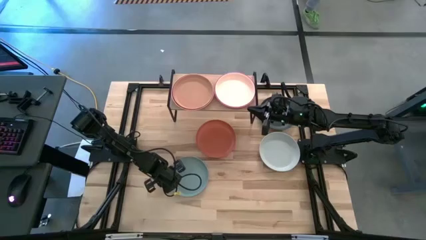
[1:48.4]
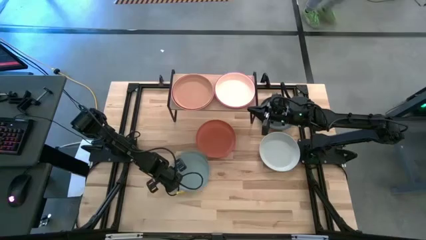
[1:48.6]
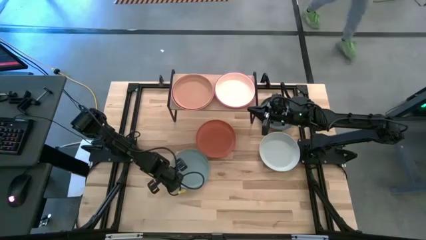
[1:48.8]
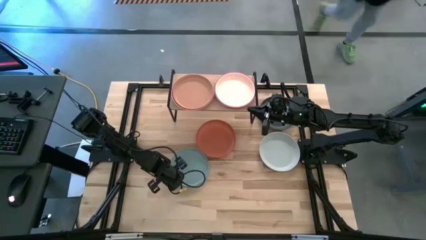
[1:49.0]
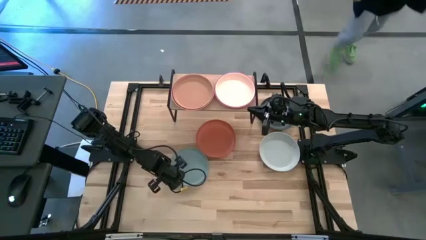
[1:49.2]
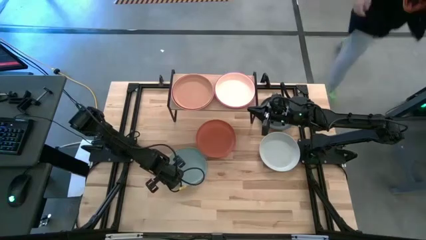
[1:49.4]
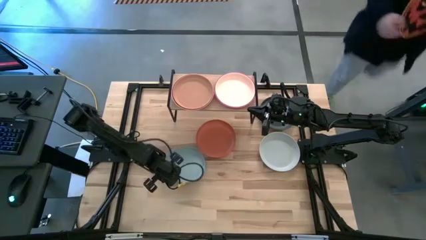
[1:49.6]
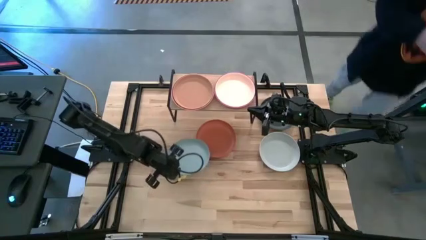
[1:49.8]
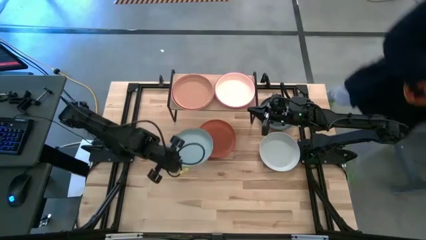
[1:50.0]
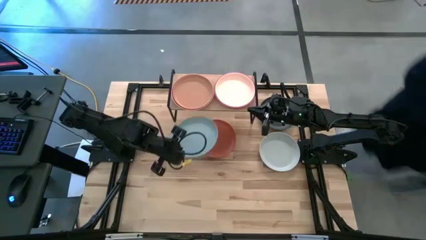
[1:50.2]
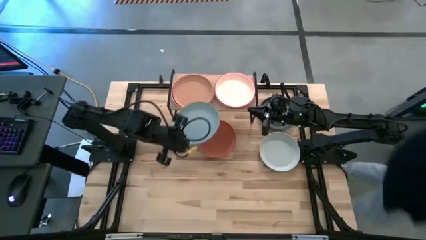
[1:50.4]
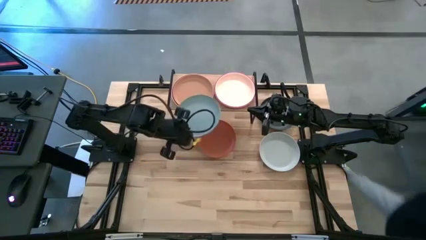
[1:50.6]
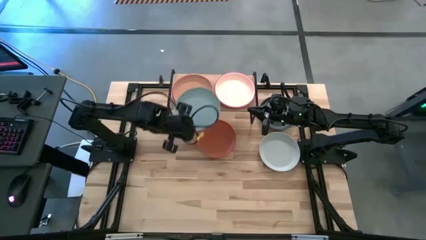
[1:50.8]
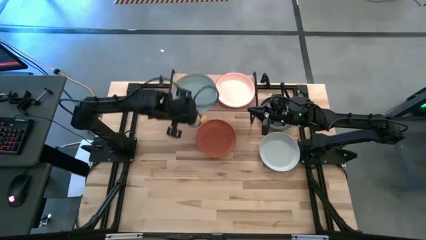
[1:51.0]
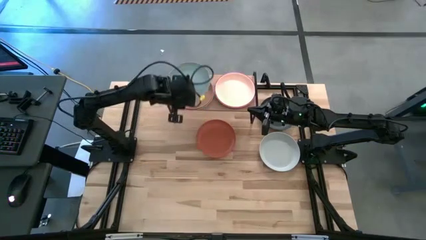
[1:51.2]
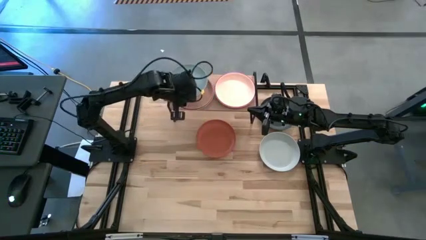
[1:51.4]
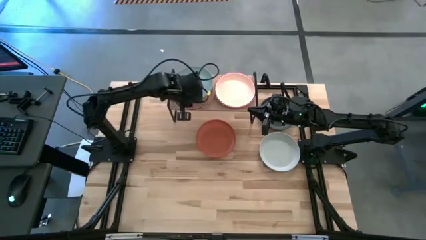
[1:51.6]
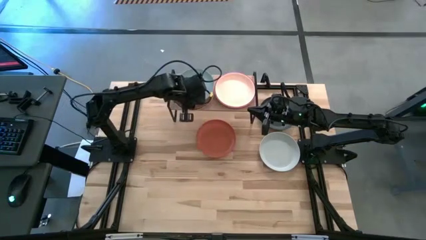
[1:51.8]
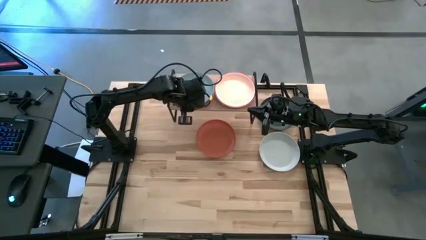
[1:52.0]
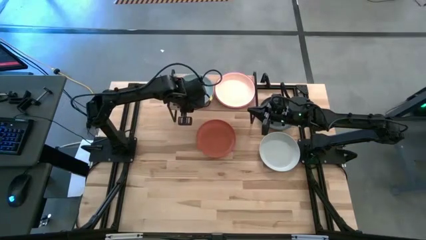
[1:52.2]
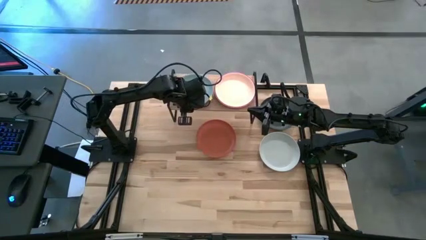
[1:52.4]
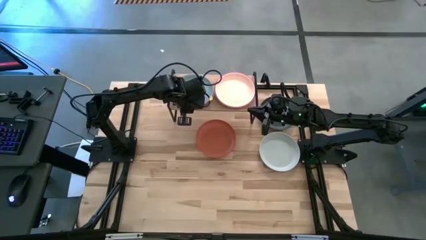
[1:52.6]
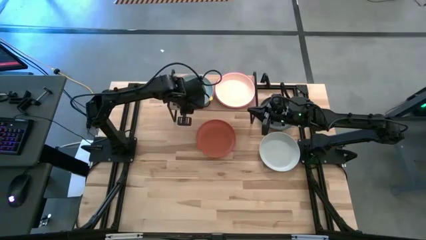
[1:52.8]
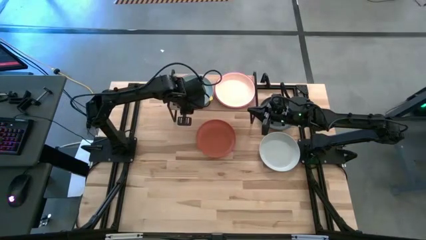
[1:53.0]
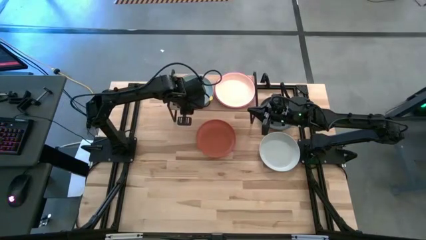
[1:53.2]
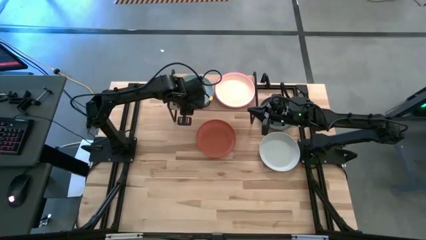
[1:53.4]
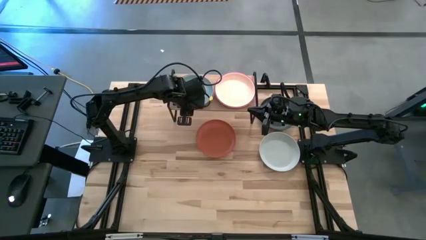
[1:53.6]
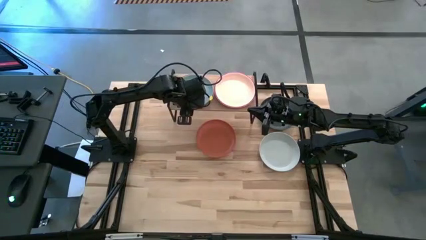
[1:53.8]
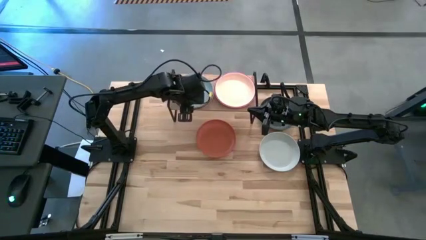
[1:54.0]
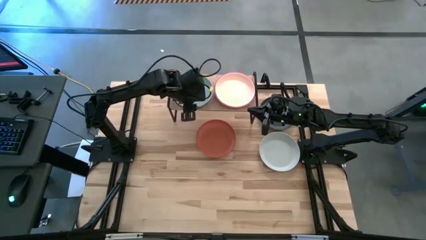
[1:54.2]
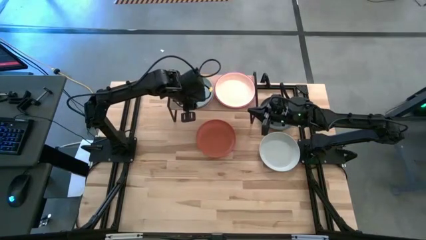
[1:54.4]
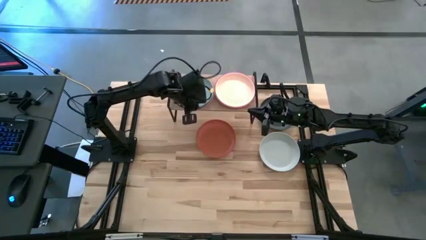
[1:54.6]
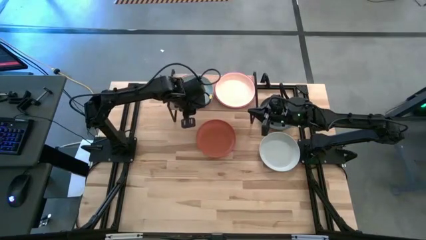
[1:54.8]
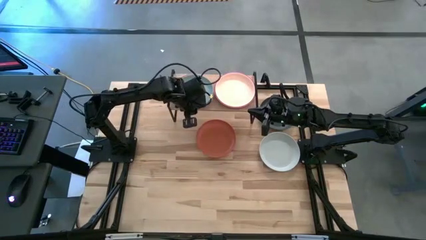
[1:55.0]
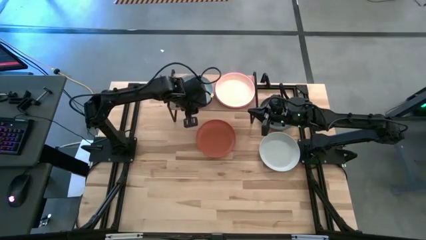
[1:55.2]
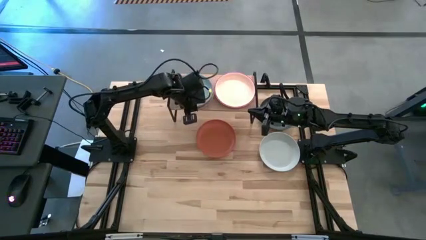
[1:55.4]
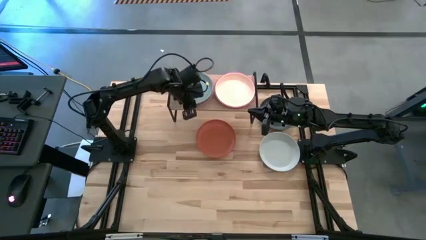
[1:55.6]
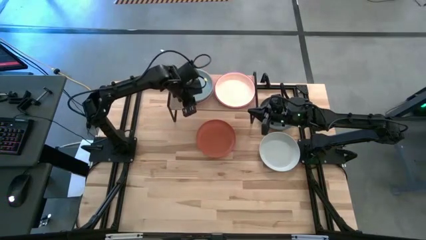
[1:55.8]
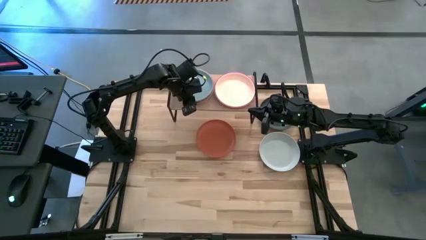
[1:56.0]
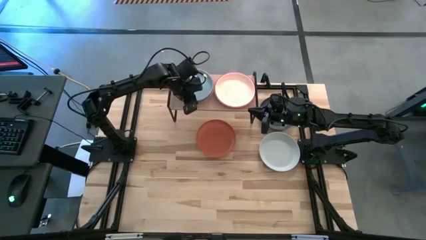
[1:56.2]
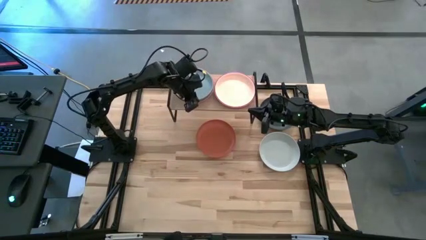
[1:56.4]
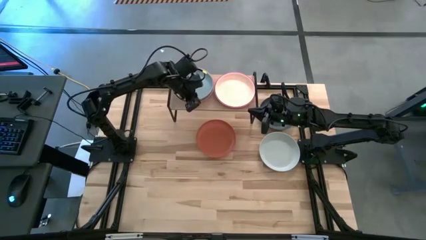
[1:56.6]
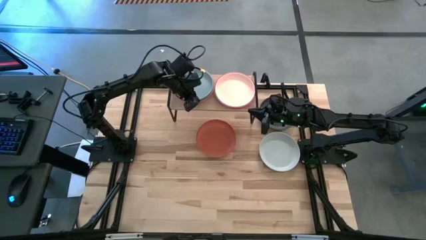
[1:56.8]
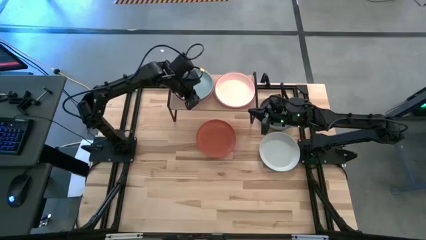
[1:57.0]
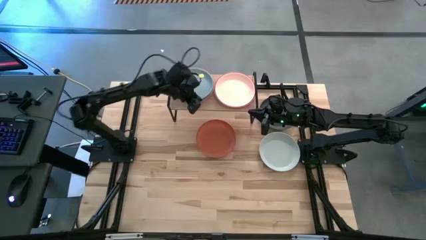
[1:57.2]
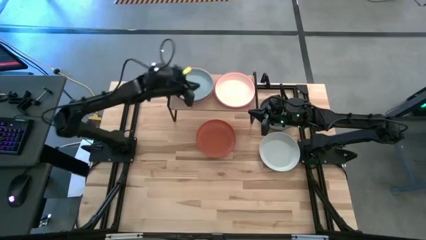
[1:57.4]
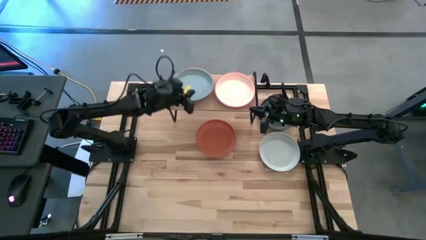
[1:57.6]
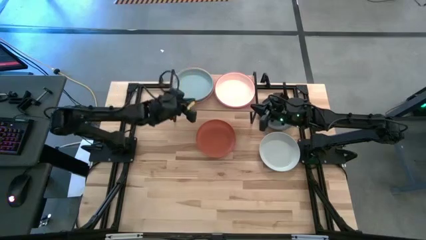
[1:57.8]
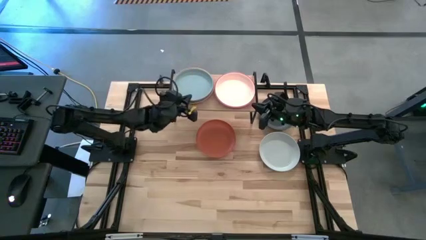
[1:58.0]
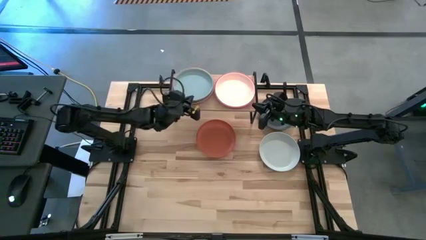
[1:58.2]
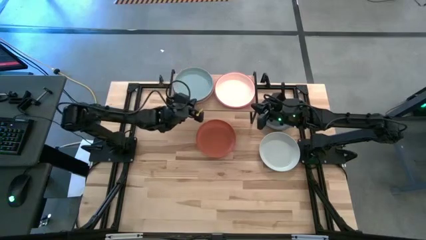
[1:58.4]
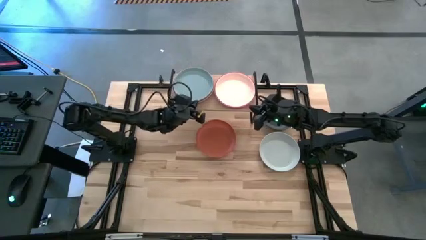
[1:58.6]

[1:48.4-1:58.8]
Task: Place and stack plates onto a shelf
Stack the light blue plate on top of the light brown plate

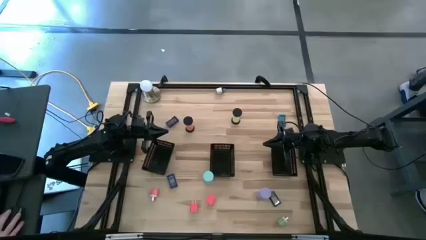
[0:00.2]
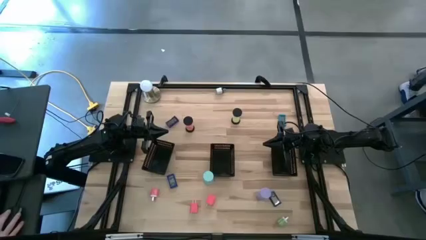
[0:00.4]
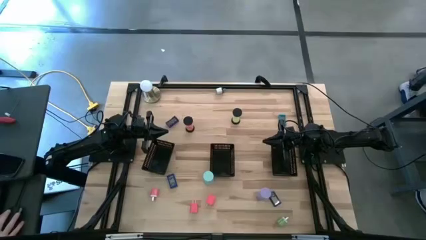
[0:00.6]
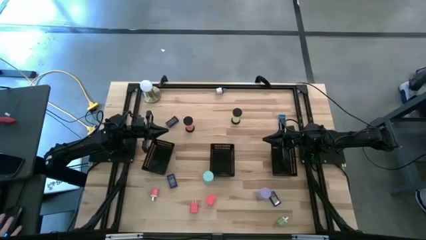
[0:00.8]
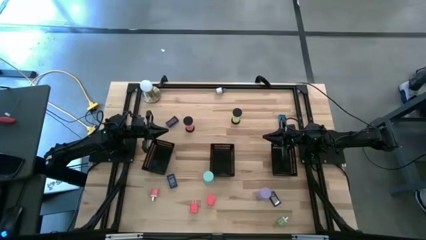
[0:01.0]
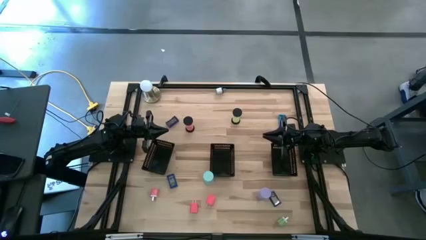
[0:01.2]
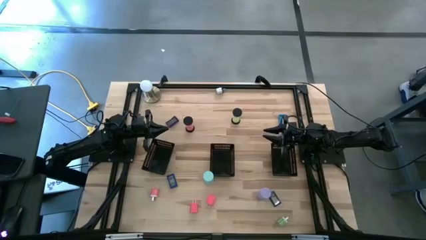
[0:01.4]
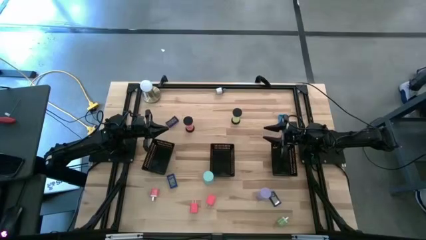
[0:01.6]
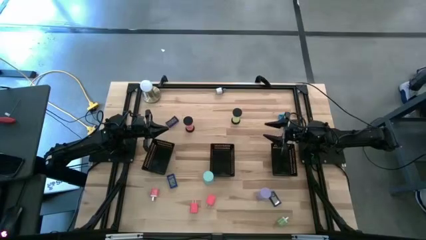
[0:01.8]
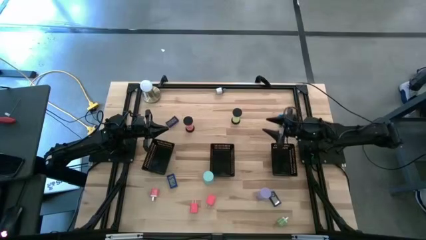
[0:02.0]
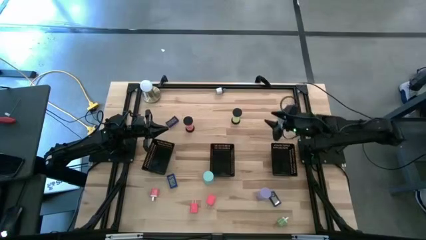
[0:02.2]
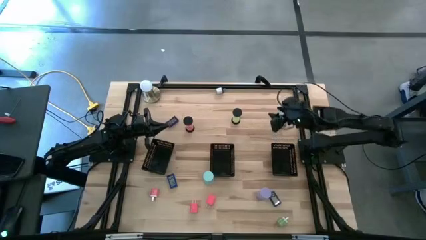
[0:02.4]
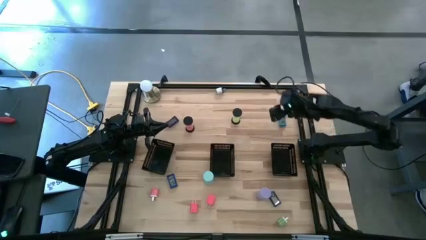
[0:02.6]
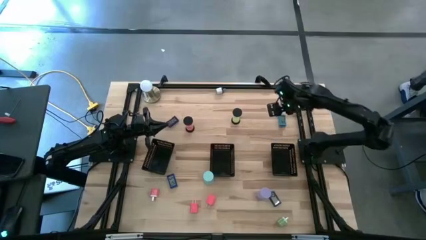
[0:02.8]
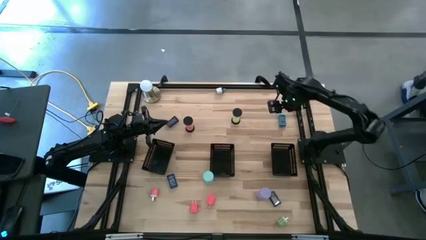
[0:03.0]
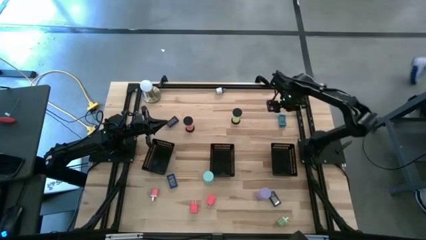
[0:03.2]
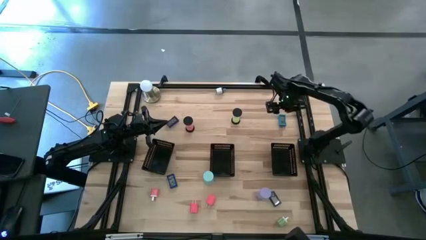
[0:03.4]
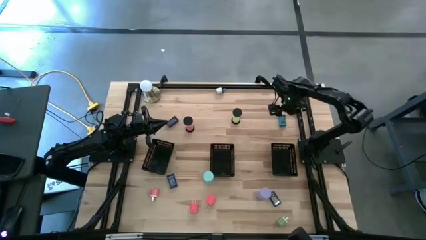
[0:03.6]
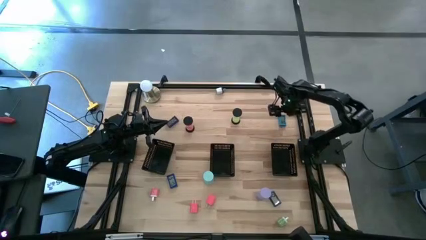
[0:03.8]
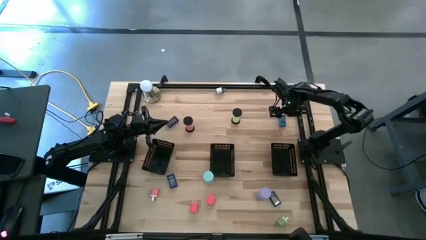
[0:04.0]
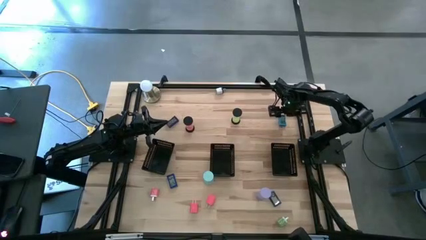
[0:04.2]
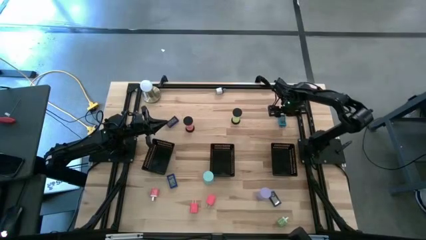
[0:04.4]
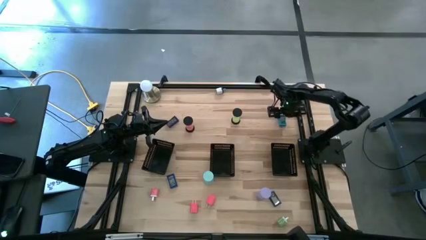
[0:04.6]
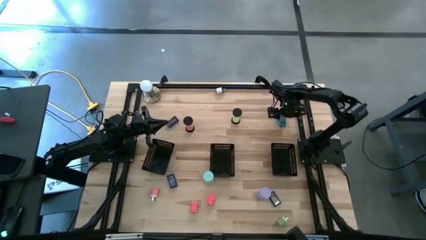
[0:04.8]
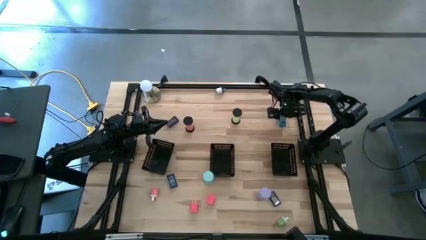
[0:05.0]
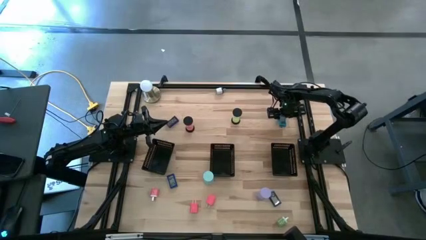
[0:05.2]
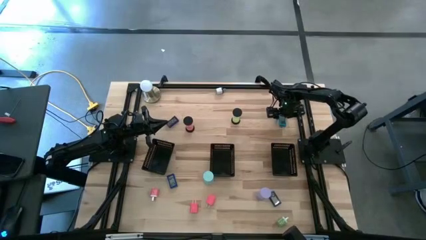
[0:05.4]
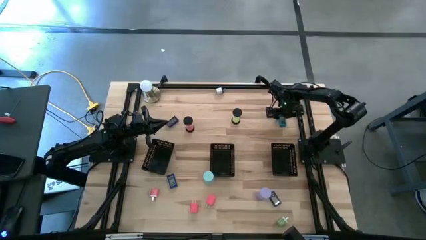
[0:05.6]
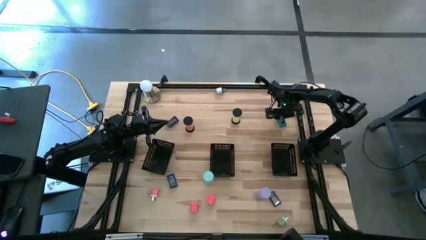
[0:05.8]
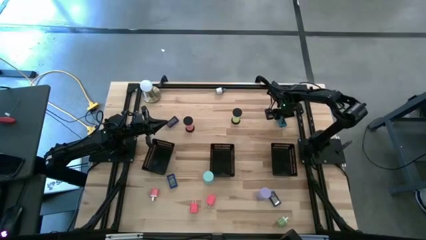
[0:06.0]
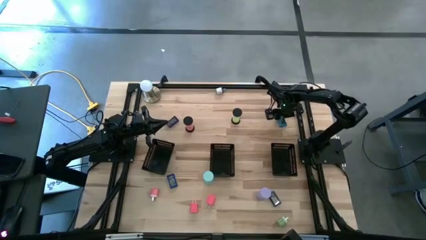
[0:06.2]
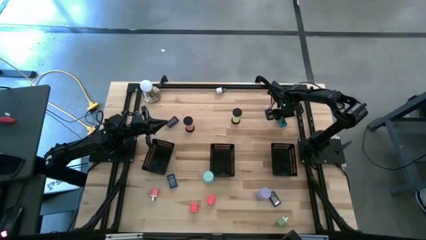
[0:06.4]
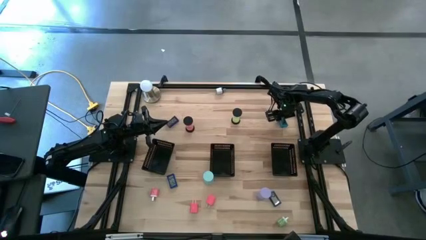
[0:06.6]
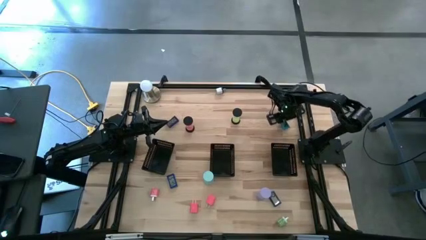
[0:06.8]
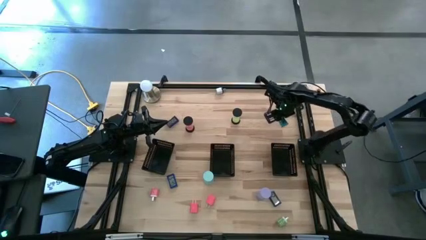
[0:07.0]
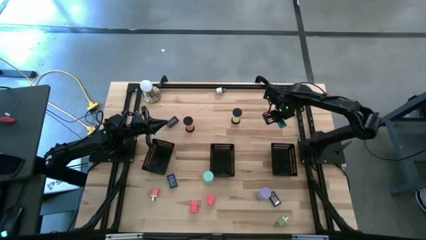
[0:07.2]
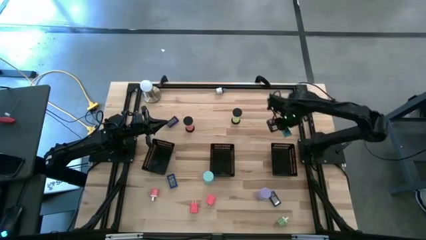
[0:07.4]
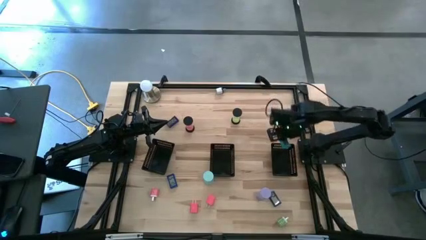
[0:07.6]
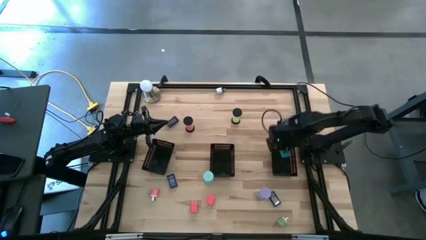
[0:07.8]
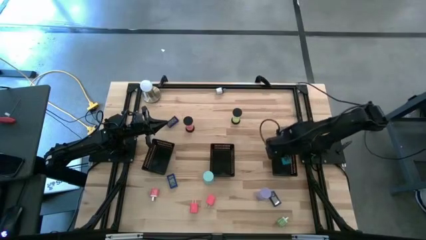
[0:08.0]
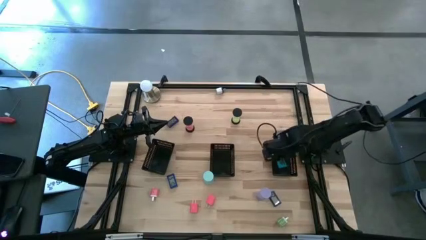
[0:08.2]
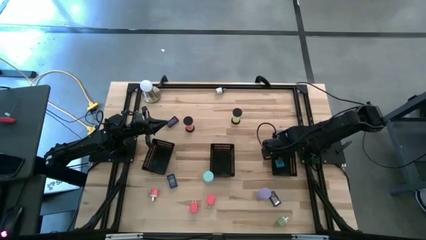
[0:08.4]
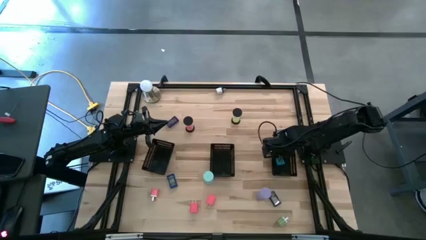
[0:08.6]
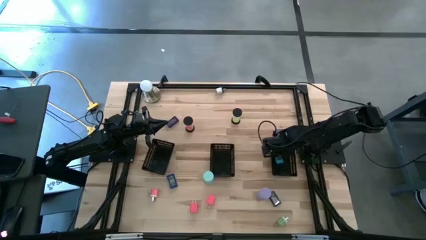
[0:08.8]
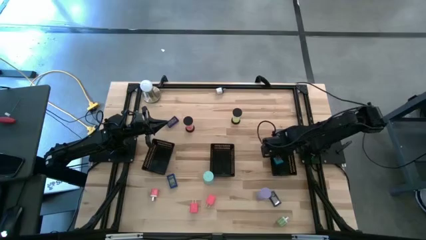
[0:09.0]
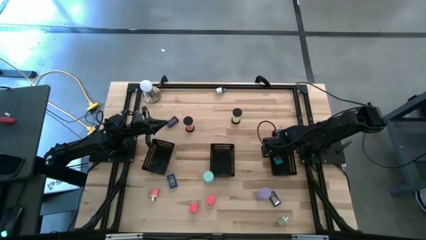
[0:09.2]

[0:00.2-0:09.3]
Task: Pick & Place Office items
Put the light blue digital clock into the right black bin
